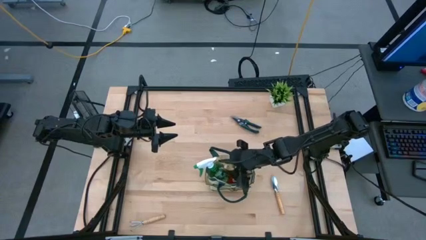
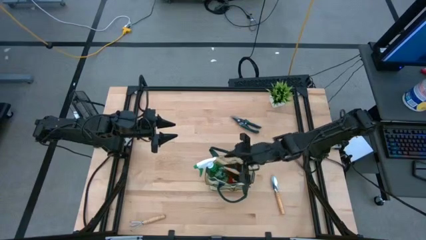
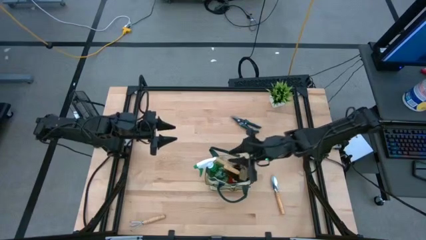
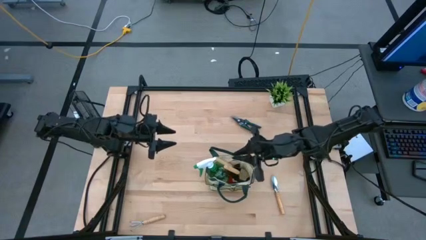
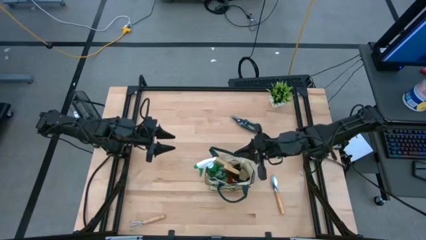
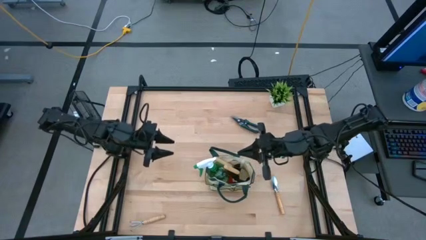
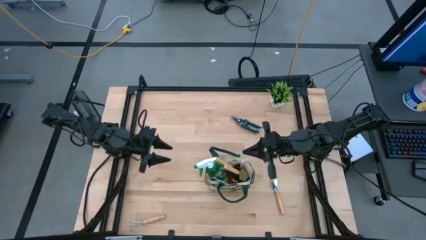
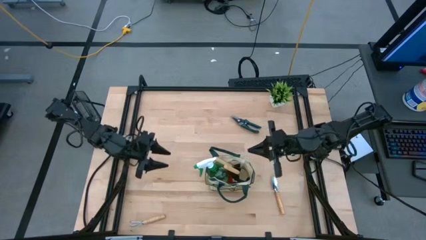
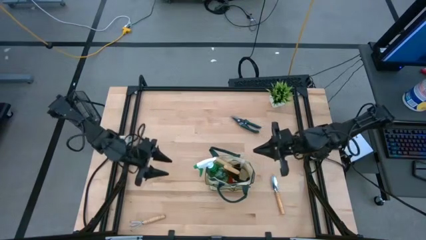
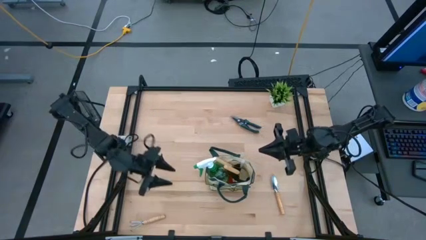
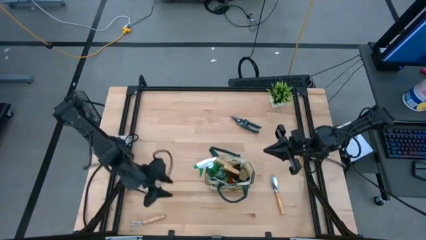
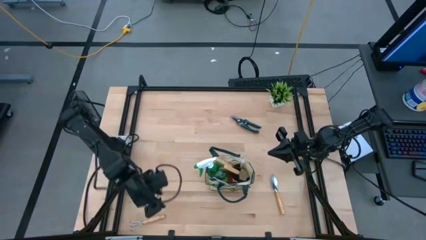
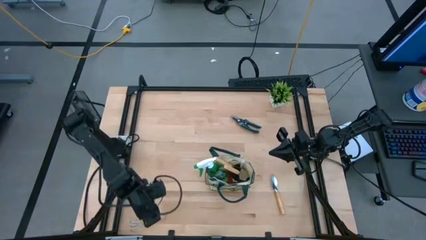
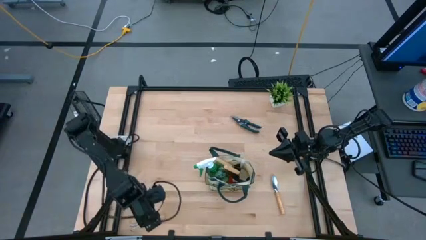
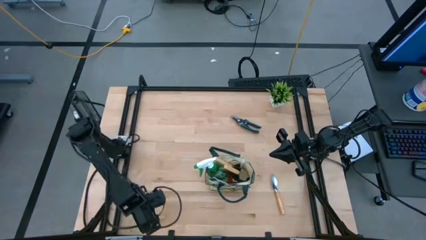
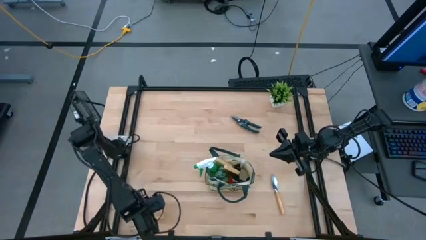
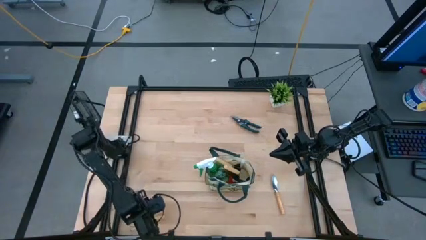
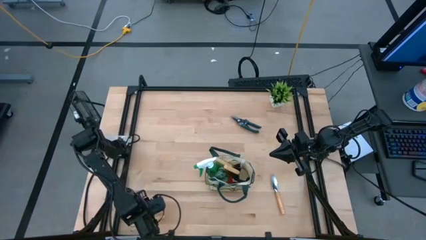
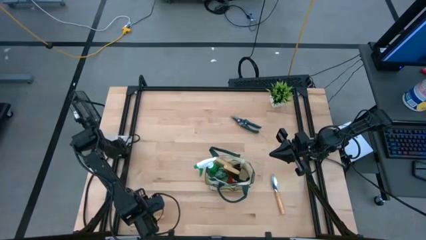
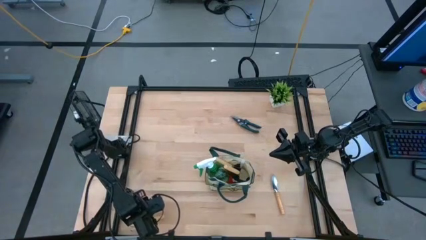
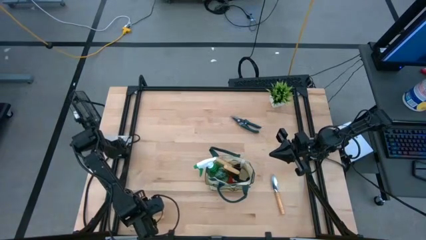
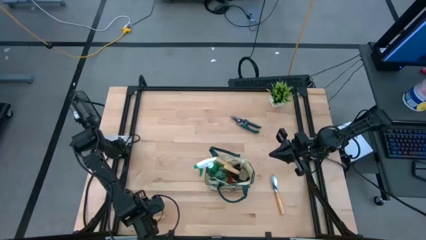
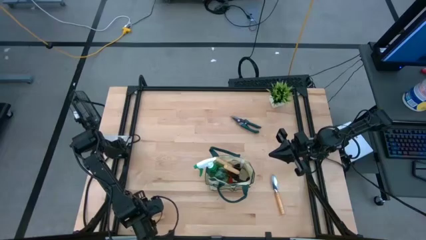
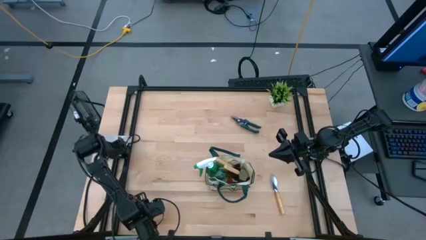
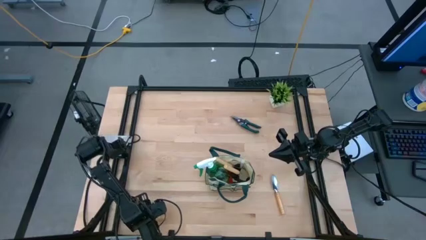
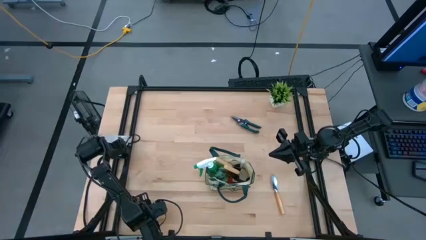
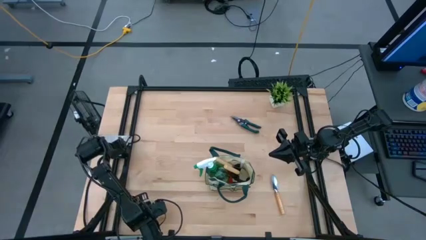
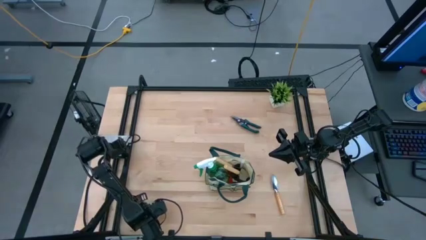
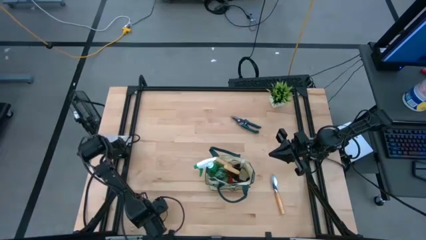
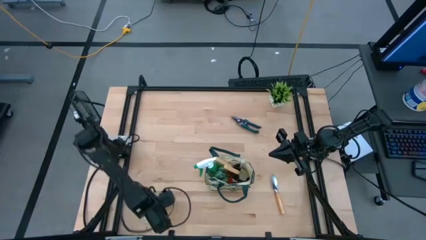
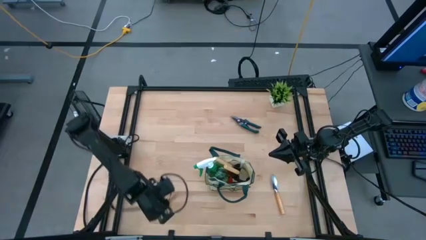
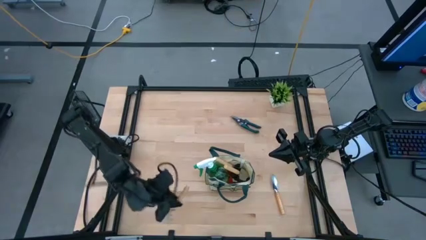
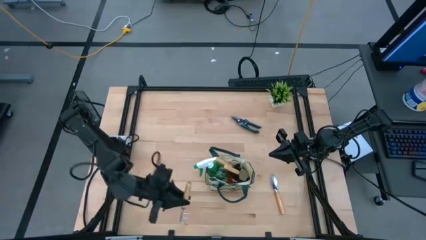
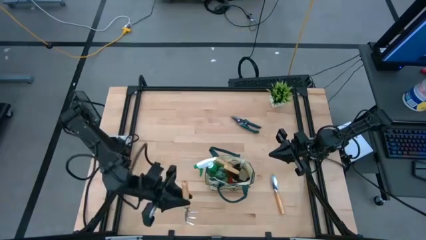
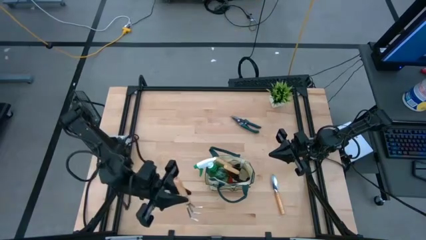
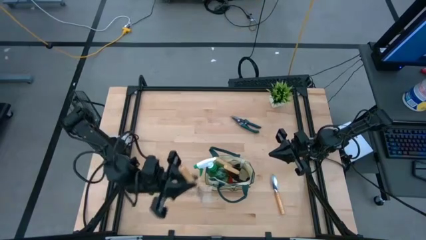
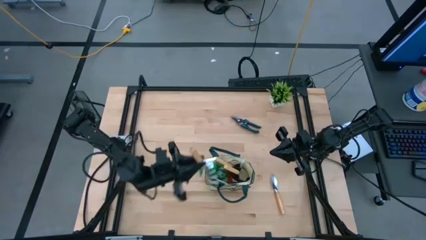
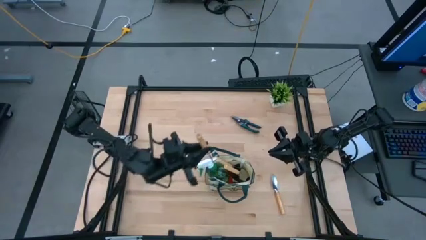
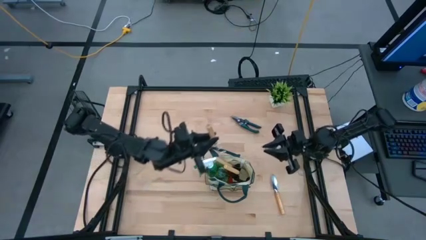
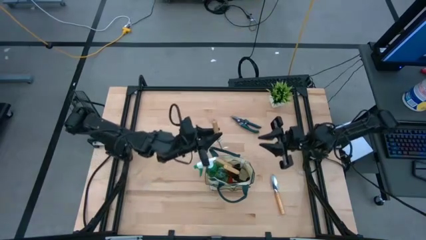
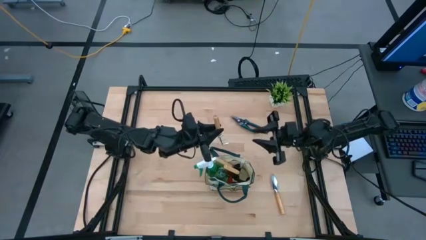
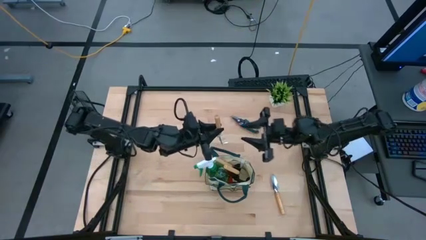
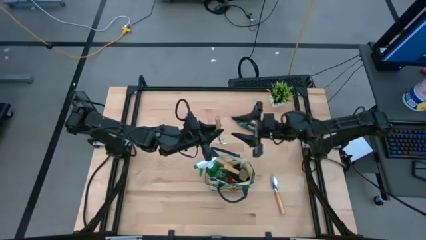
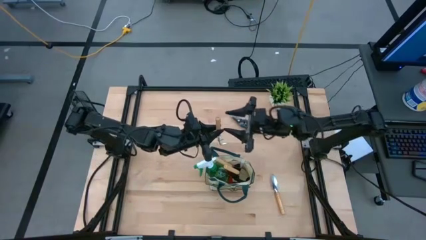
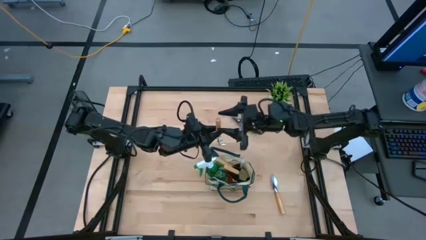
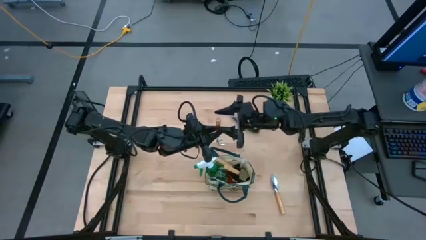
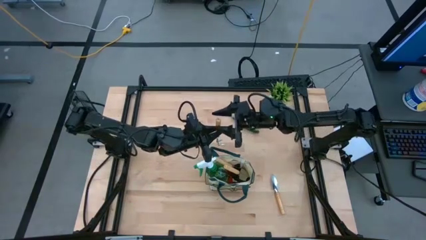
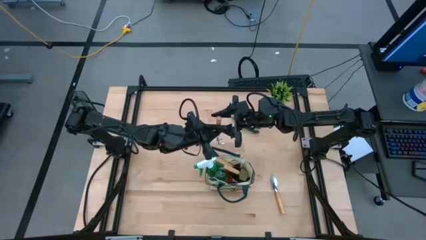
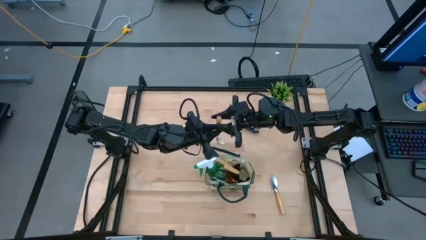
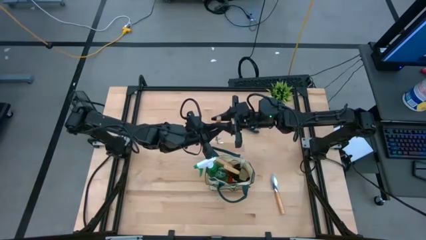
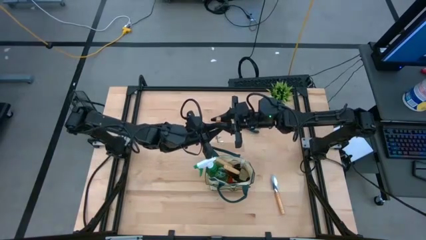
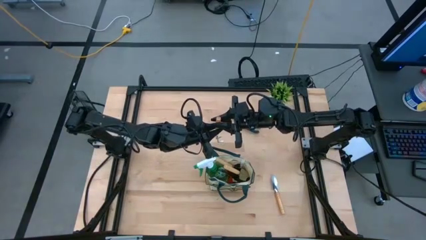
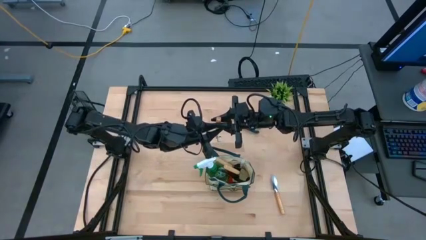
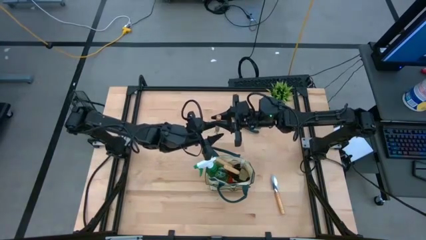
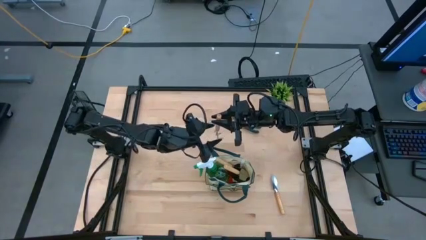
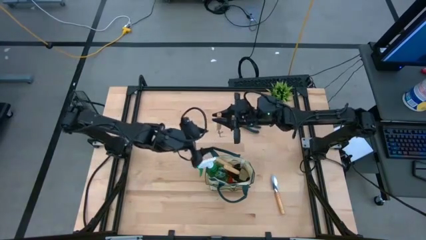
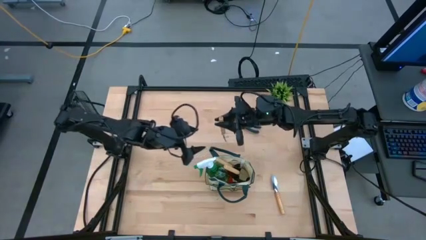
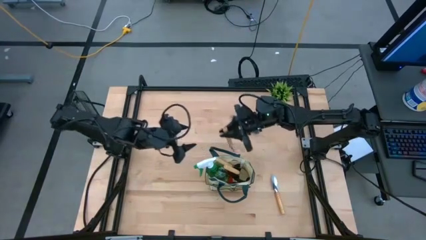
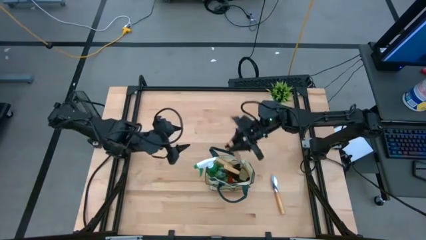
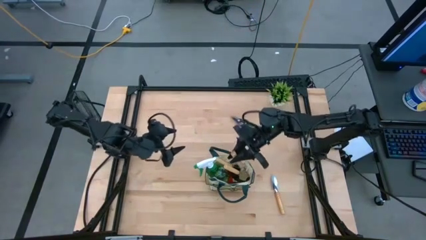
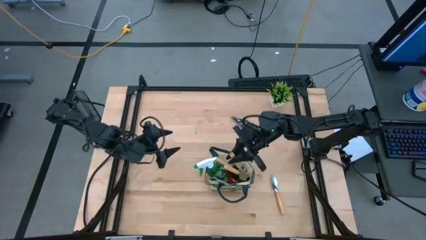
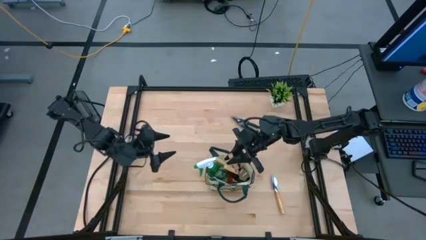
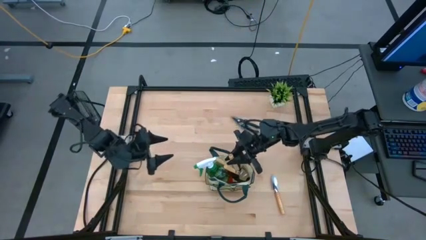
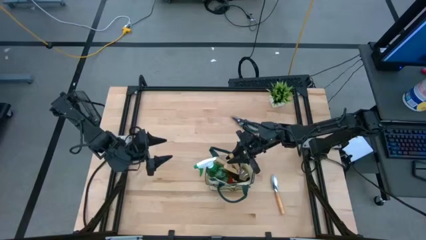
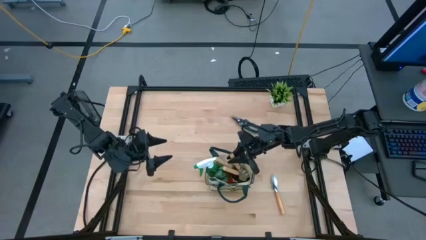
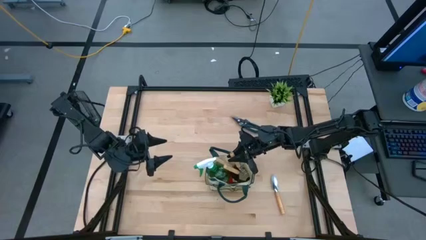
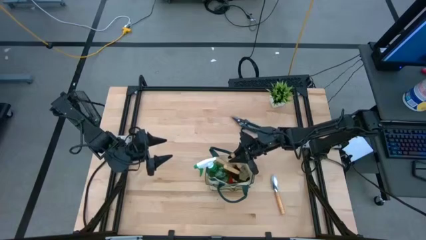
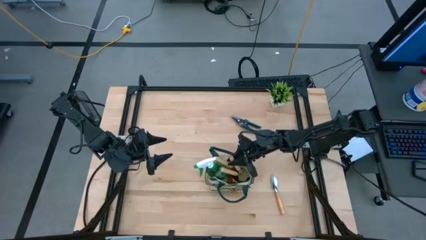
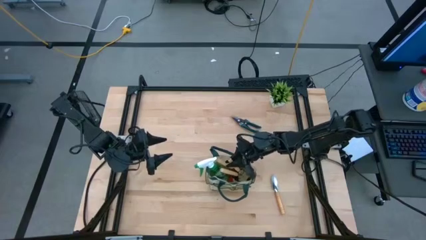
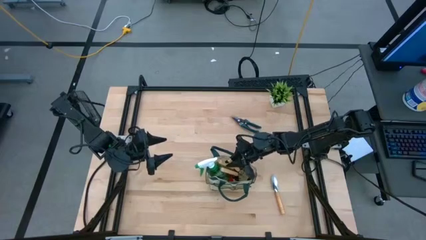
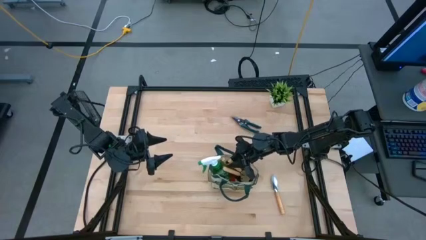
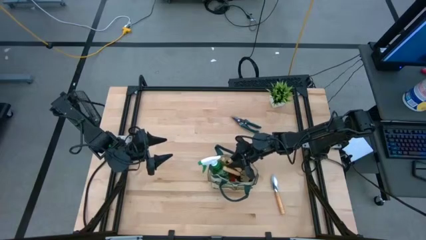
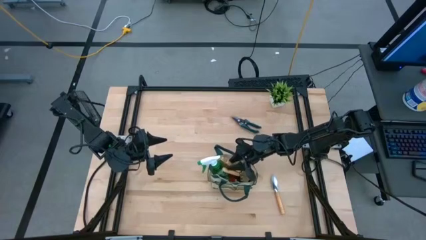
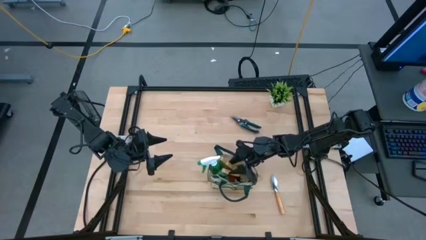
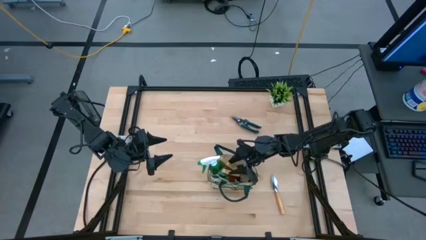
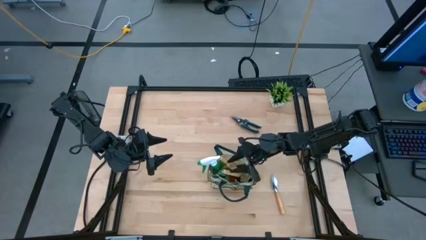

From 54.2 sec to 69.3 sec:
Task: Pick & Place Garden tools in Gardening bag
Put the brown hand rake into the gardening bag
